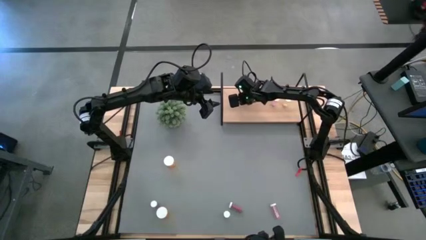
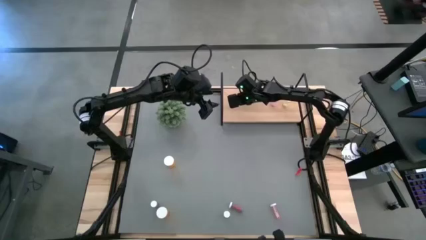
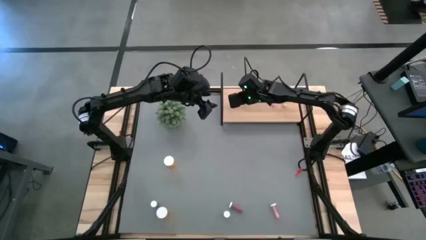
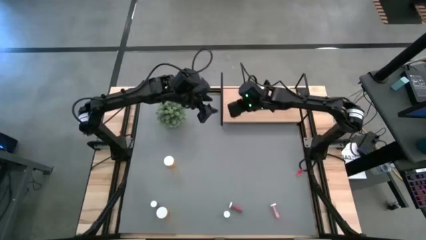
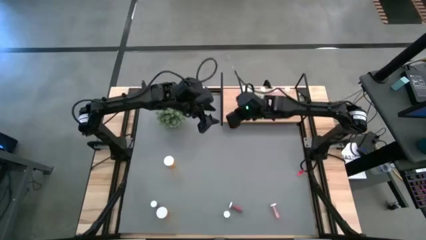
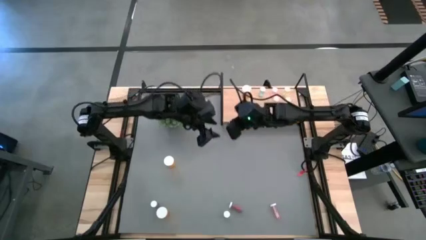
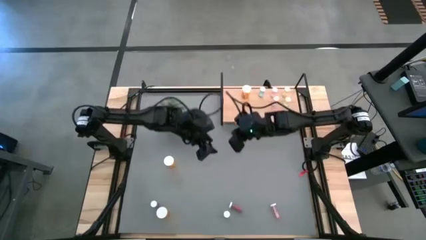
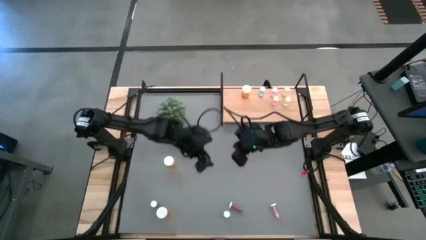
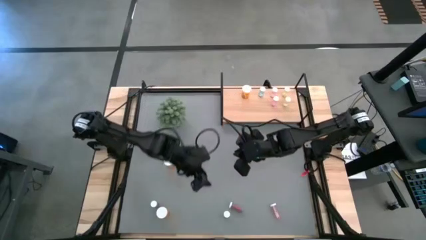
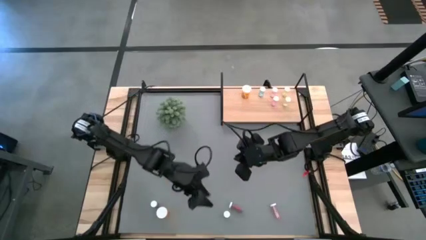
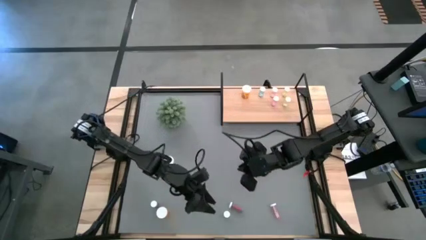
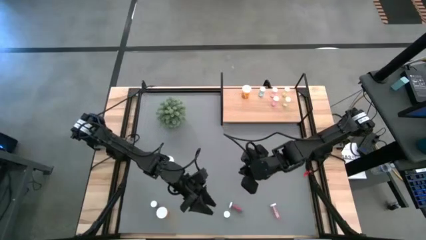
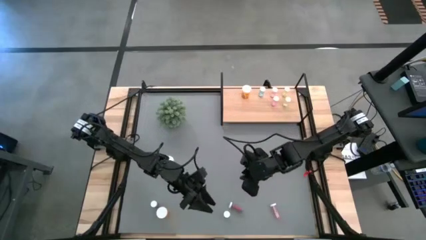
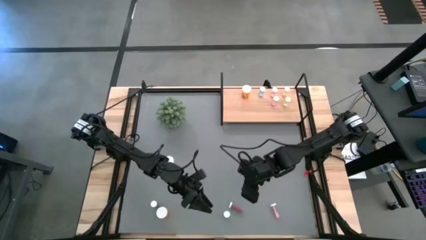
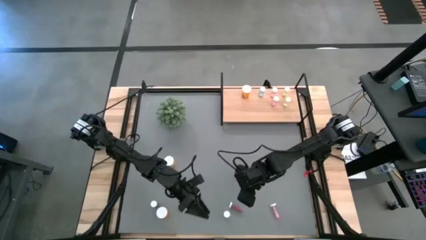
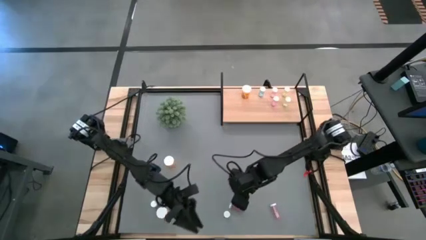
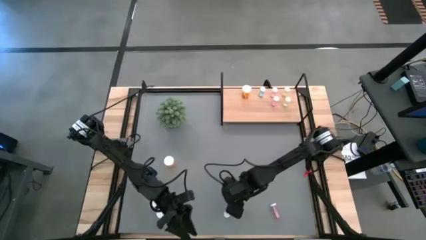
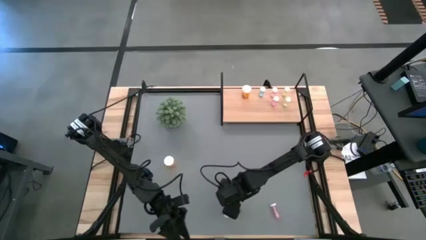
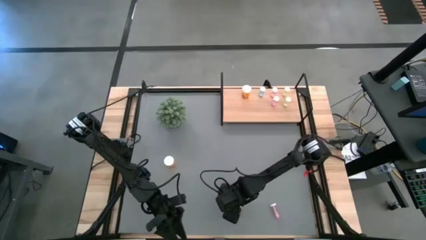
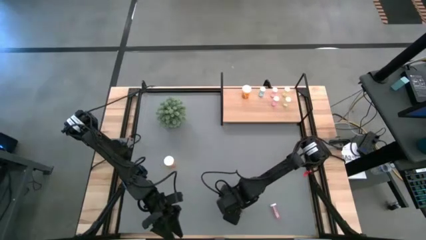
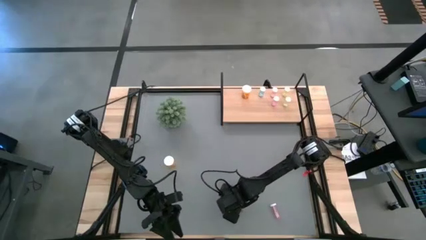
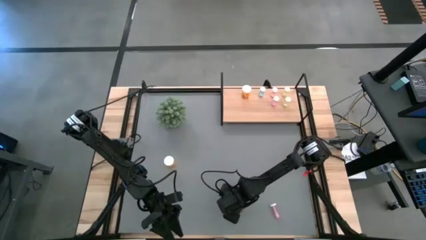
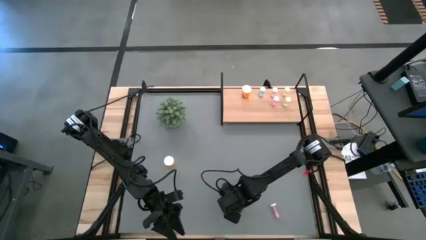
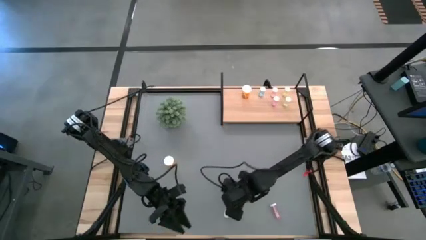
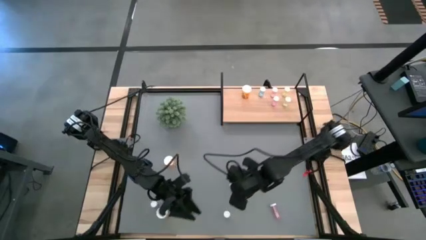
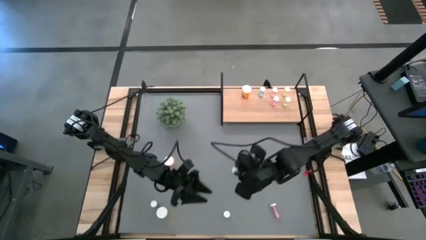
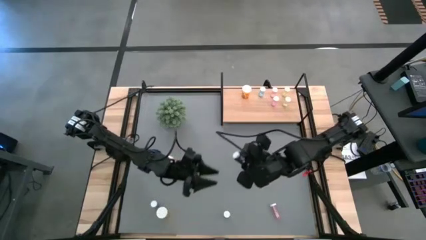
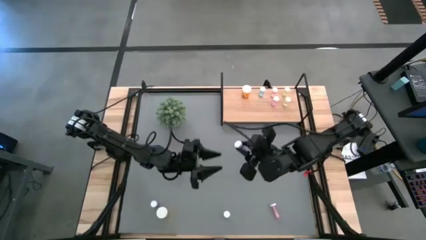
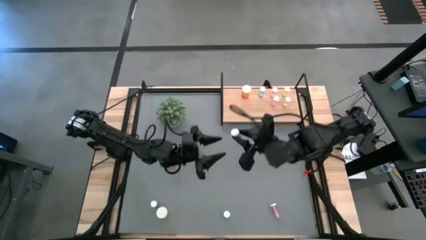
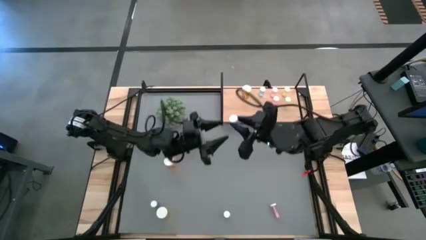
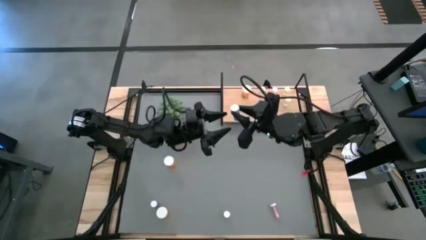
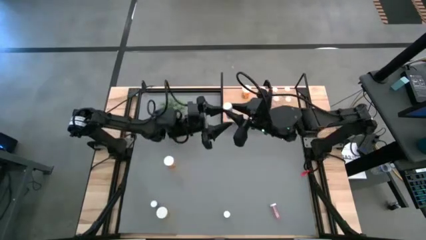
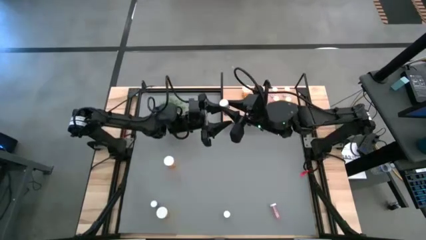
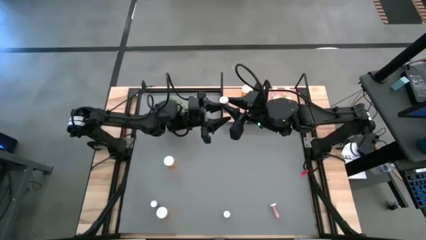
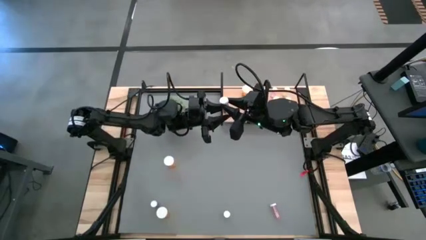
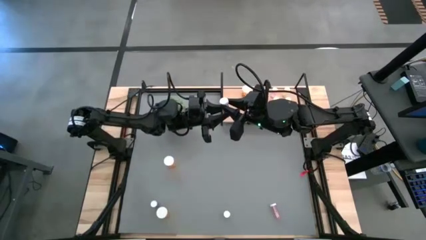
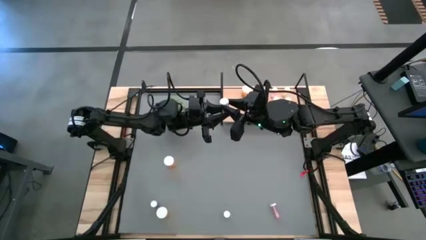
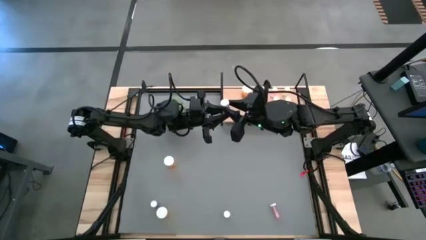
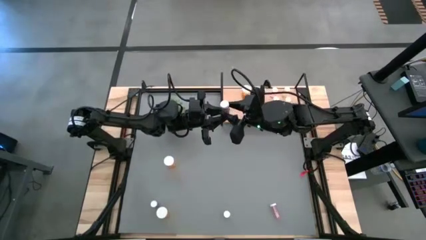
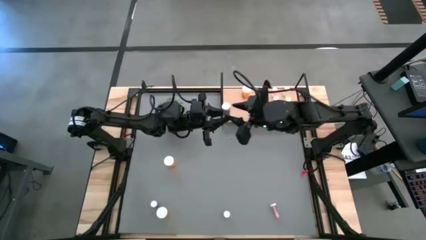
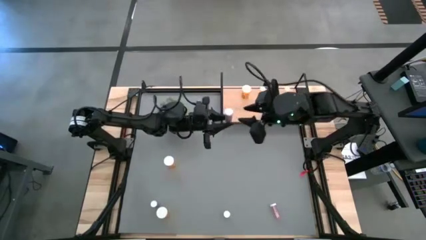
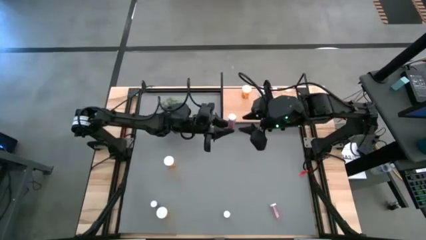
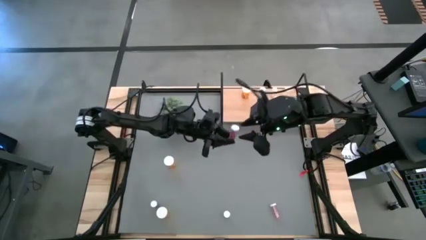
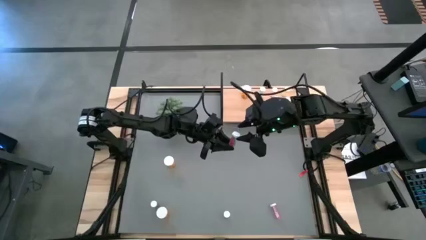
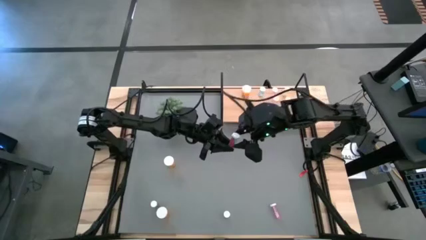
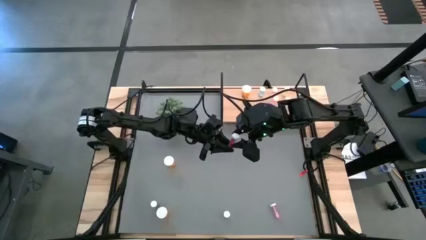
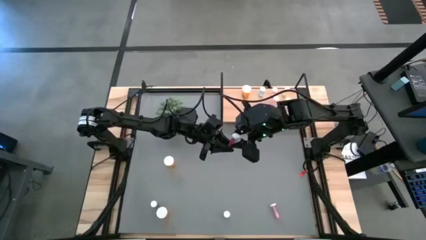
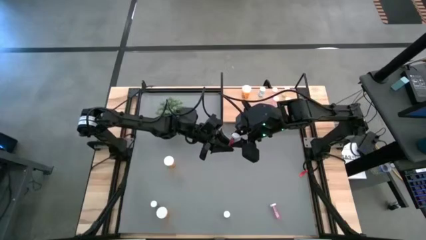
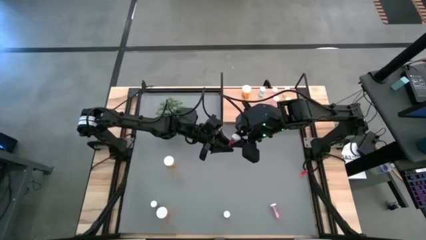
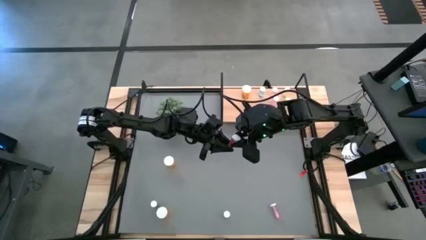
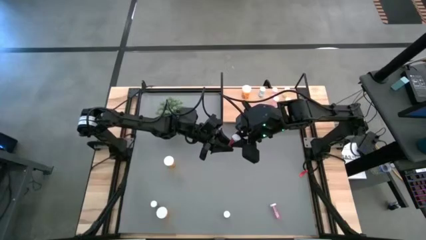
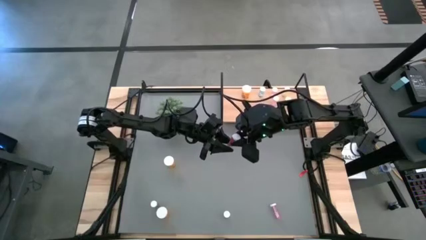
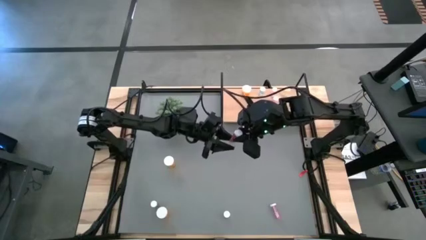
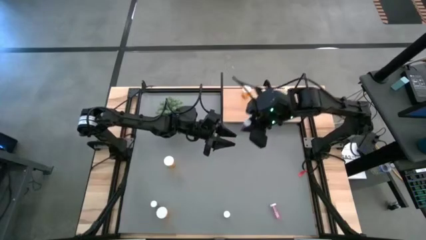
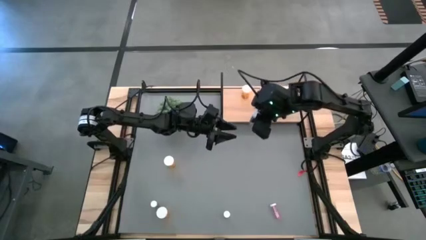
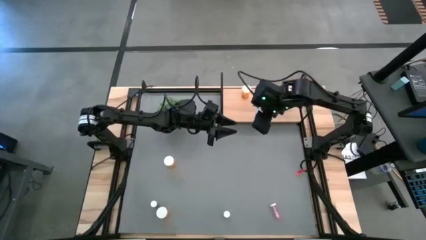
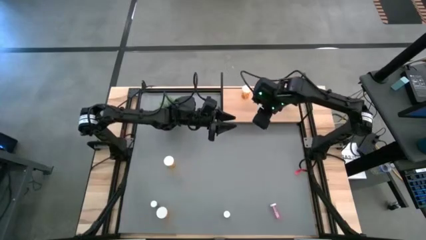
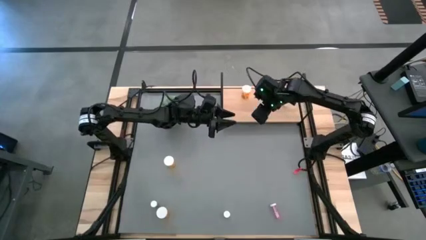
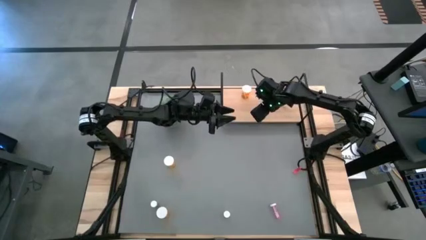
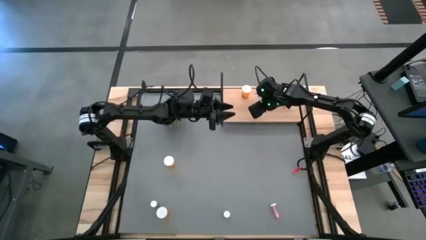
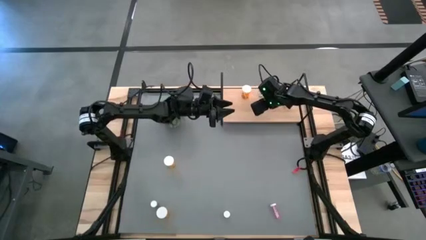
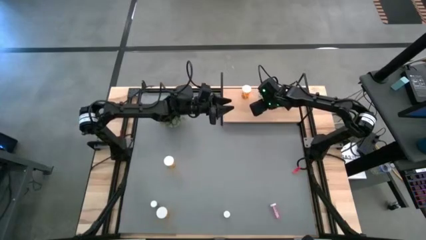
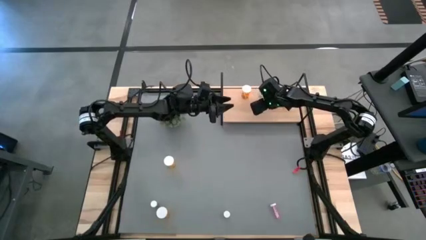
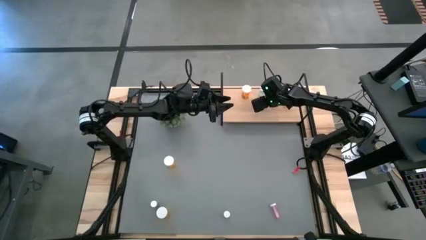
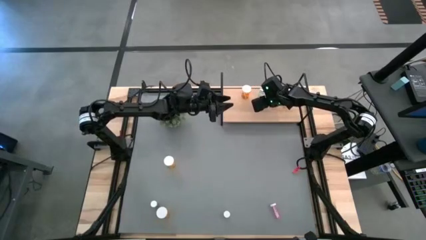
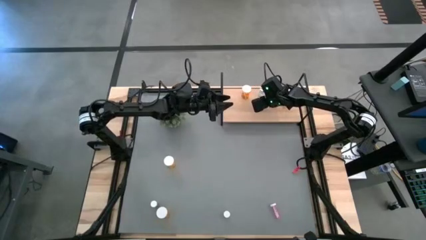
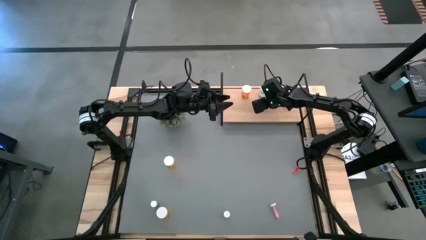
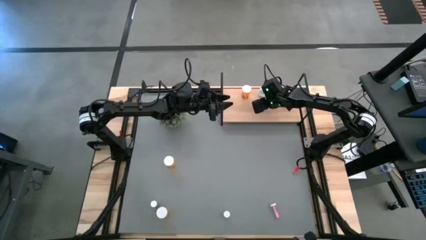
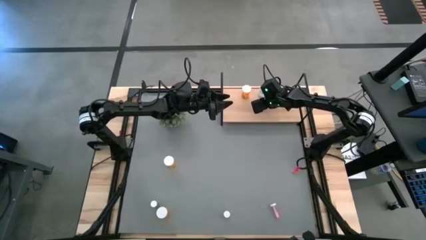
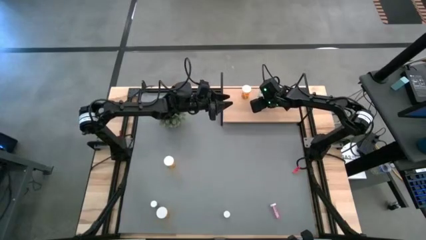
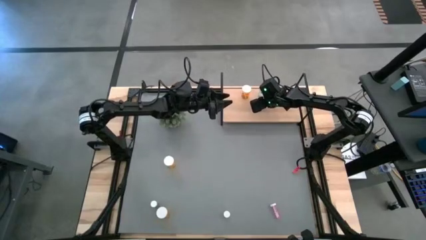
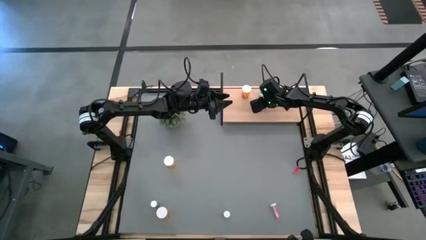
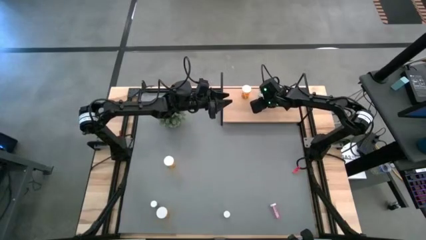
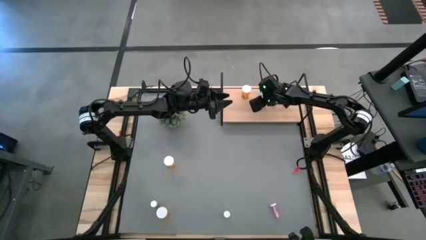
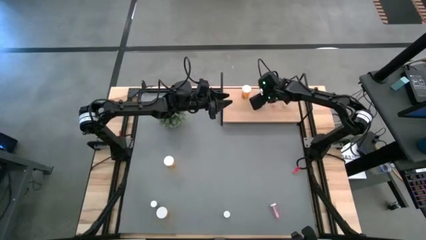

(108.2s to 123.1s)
Task: Pick and place medicine bottles onto shelf by color
Put the right blue pill bottle on the shelf aligned with the other blue pill bottle
